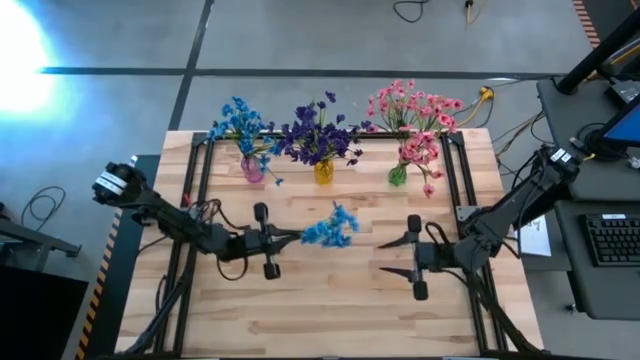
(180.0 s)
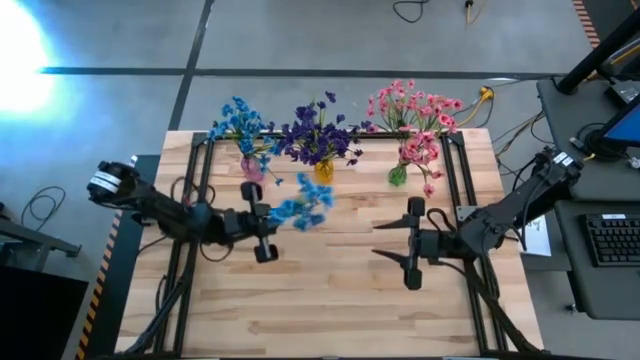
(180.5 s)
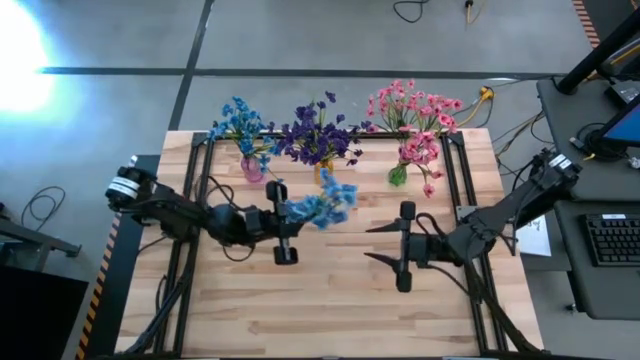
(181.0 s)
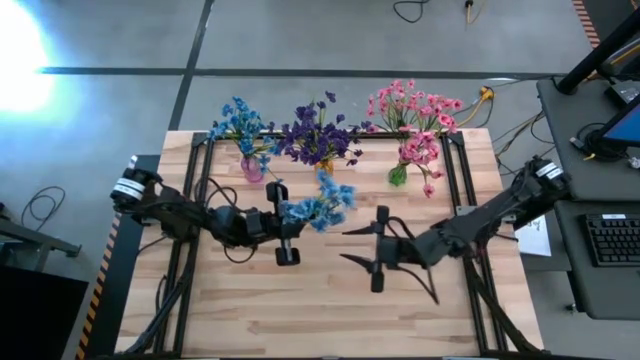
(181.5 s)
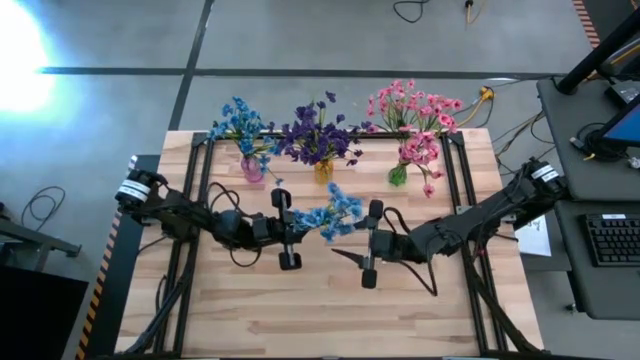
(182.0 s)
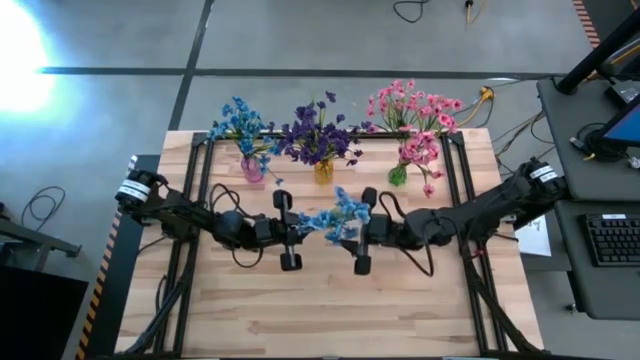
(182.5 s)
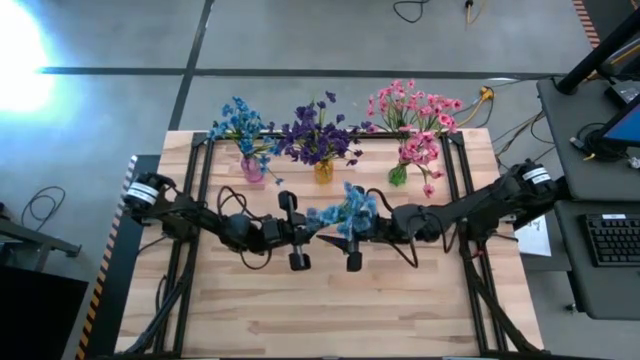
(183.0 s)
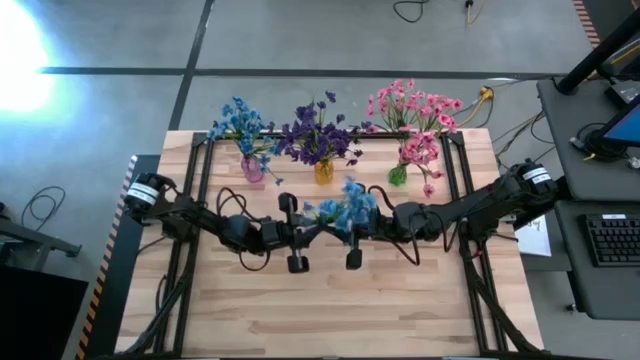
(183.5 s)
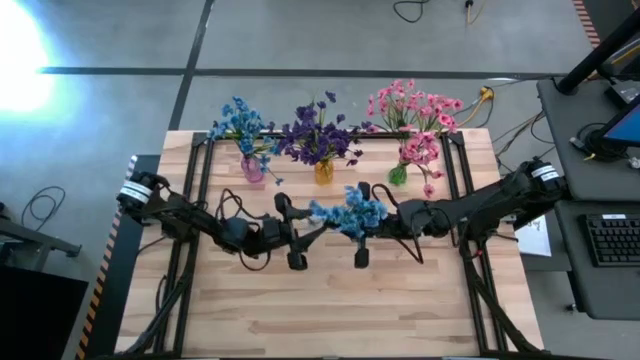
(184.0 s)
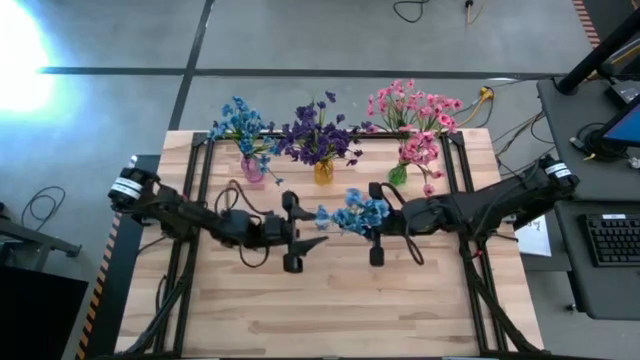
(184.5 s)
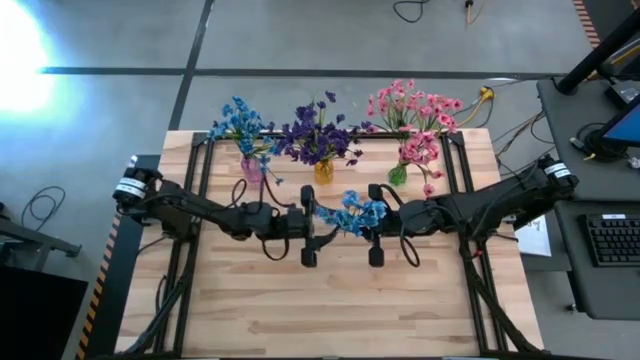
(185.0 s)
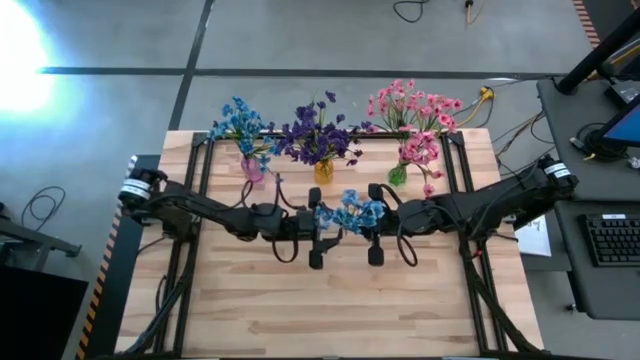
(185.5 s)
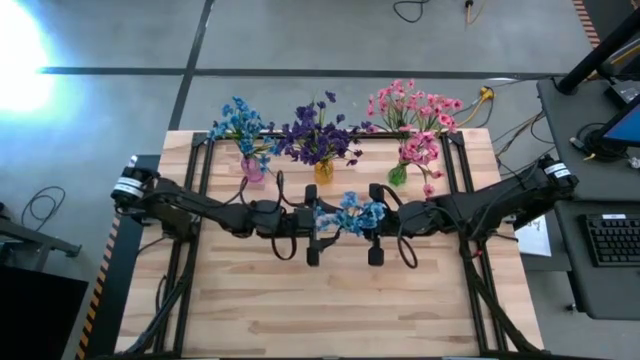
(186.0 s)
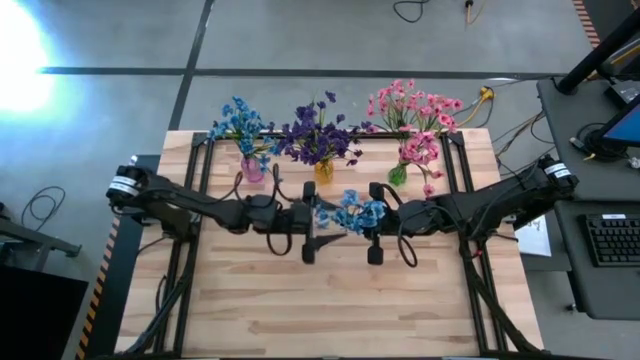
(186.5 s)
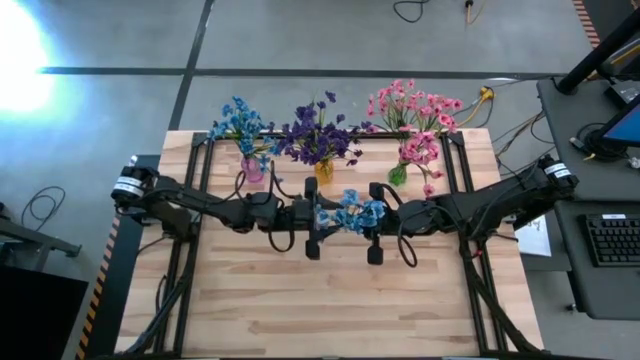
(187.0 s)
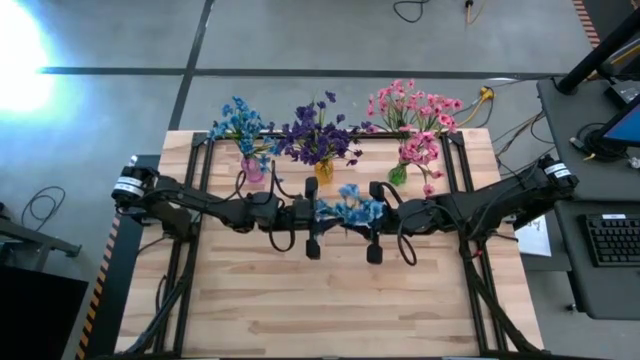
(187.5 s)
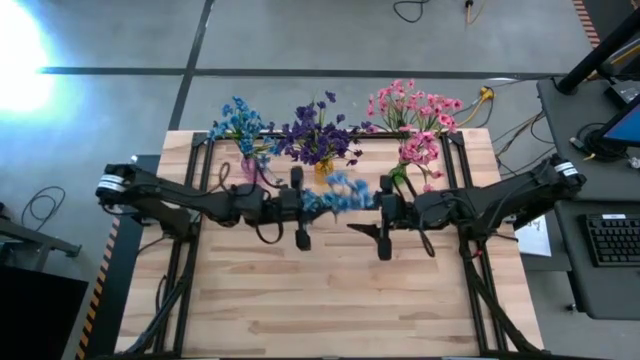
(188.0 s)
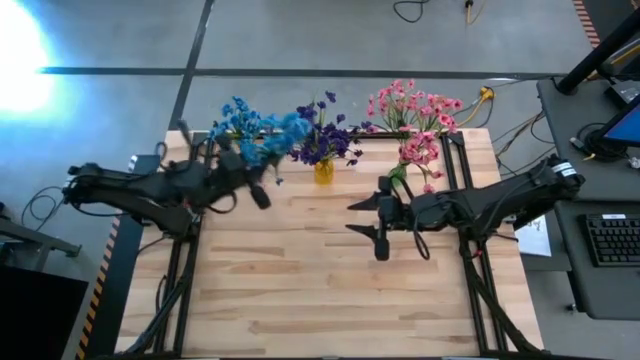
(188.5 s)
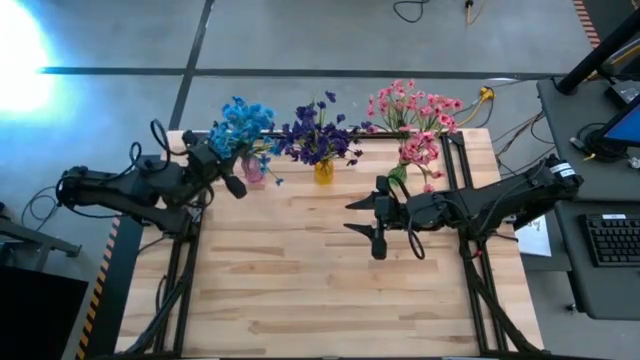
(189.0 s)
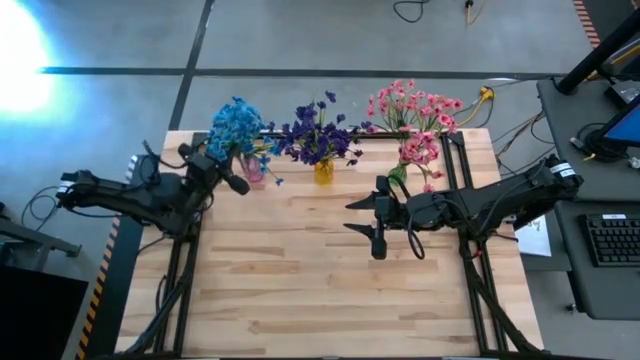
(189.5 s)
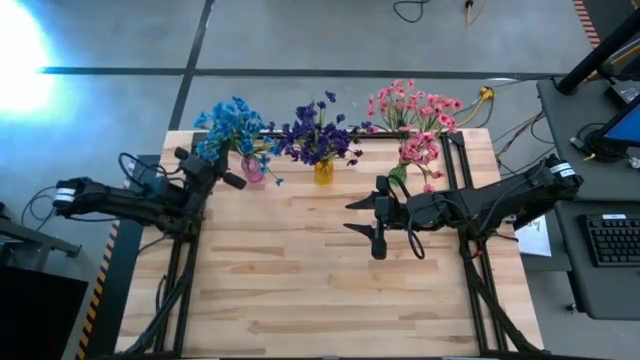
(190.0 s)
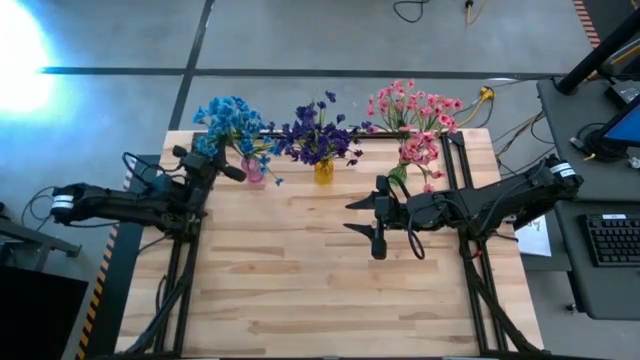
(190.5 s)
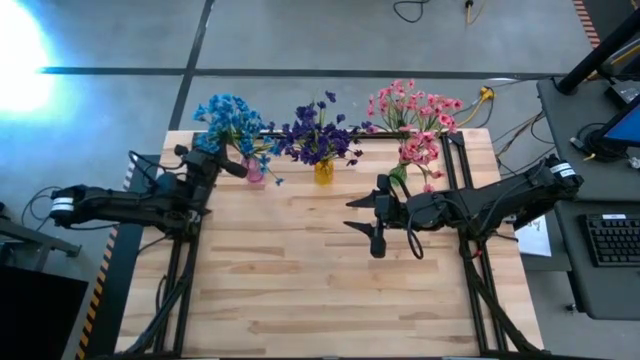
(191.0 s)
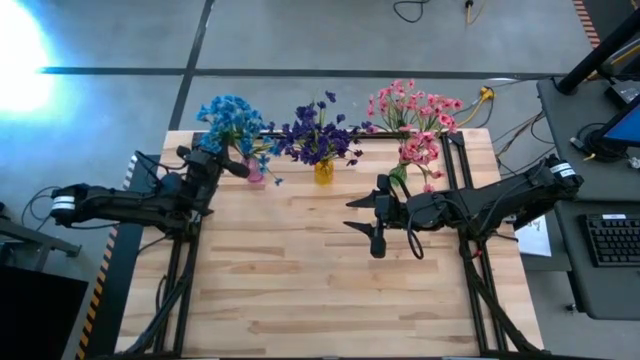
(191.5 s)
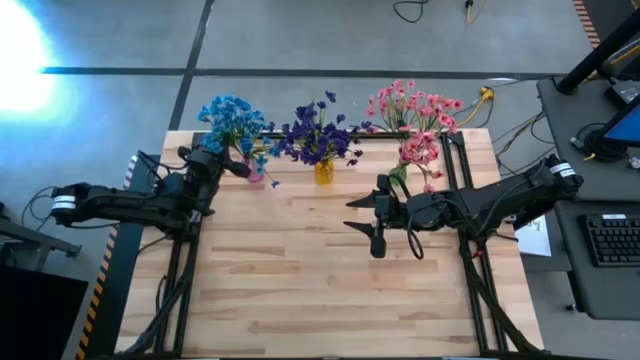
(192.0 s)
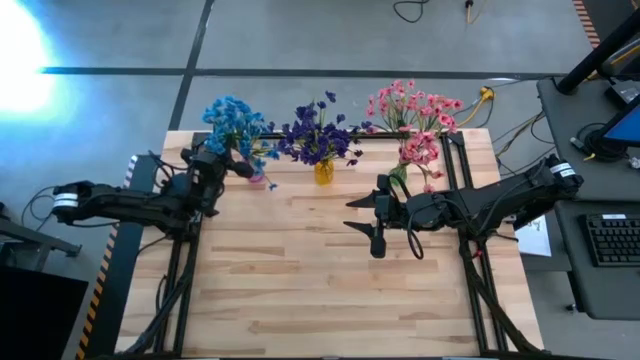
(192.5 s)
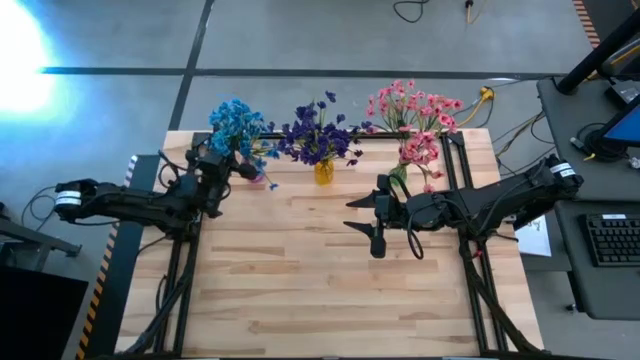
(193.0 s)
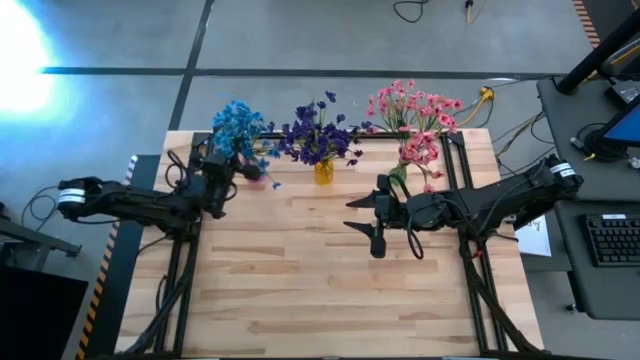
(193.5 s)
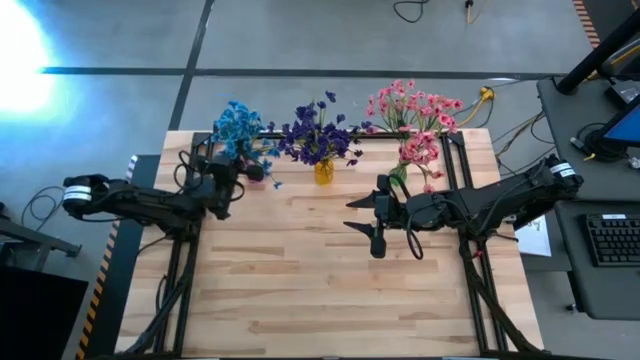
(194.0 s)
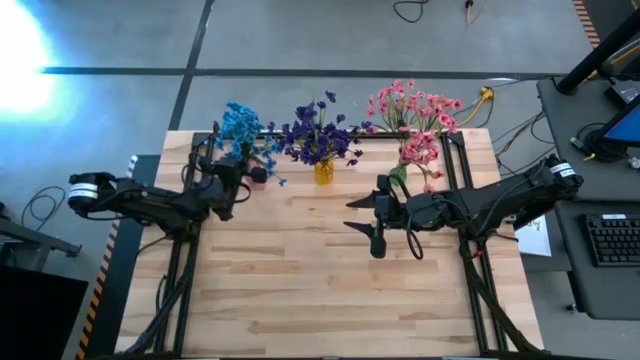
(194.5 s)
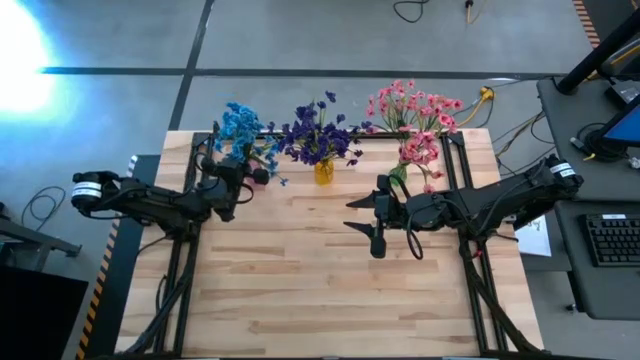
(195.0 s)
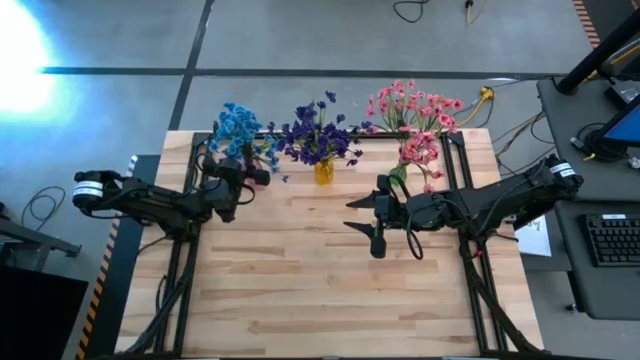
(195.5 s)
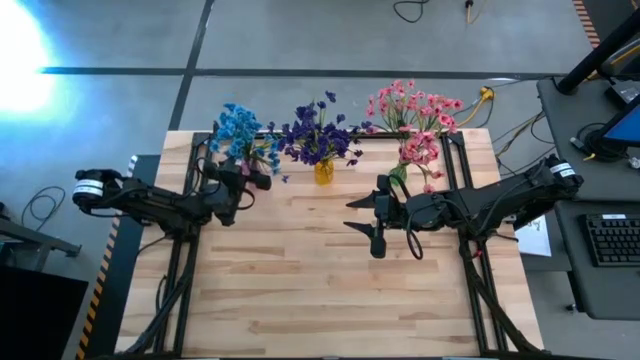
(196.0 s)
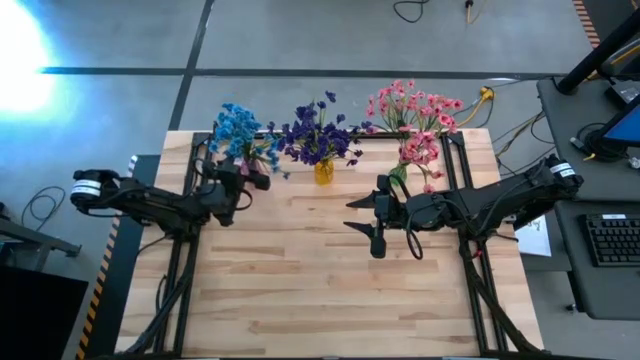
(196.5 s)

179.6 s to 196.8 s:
Task: Sort flowers into vase by color
Put the blue flowers into the violet vase

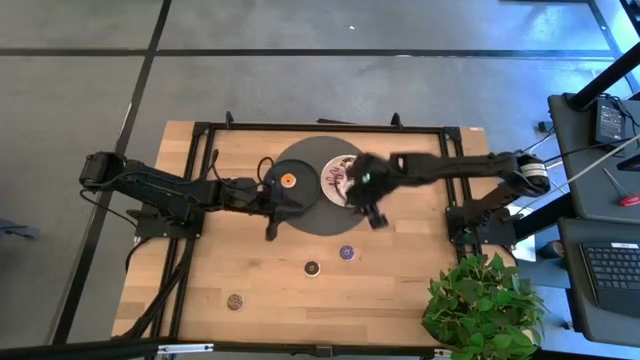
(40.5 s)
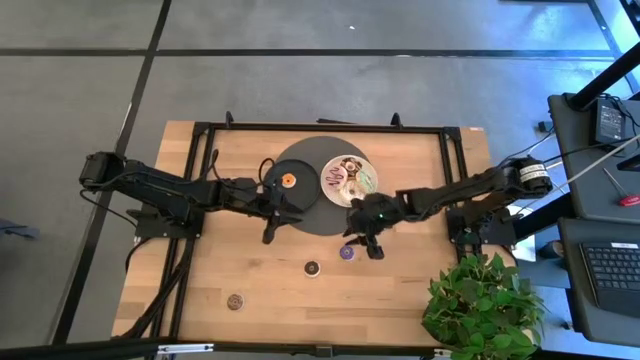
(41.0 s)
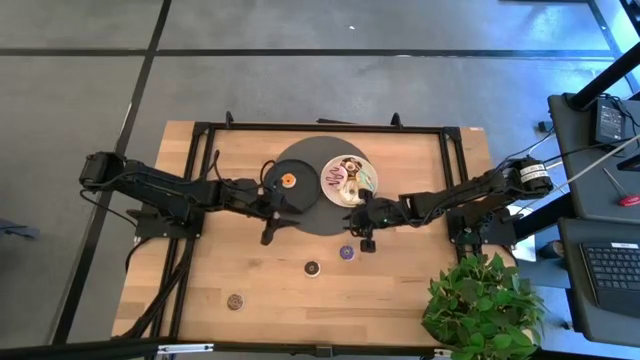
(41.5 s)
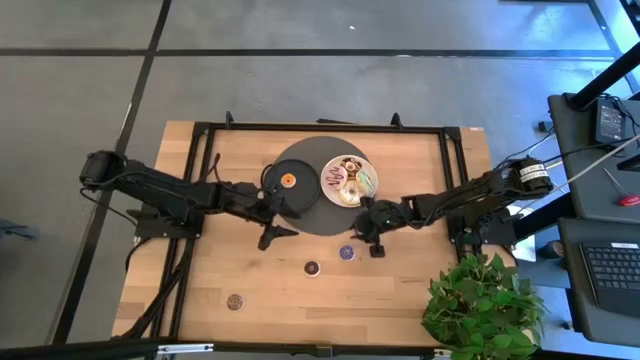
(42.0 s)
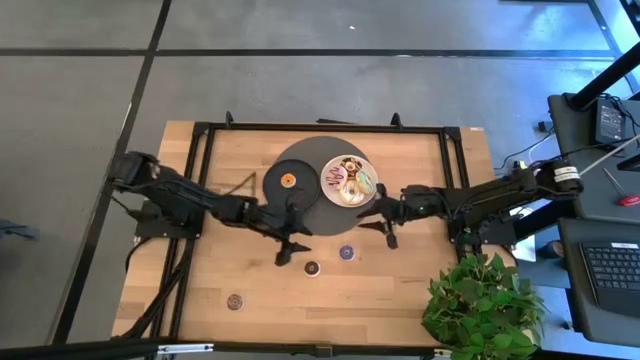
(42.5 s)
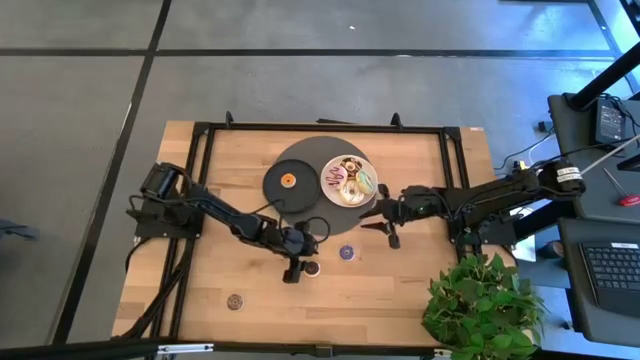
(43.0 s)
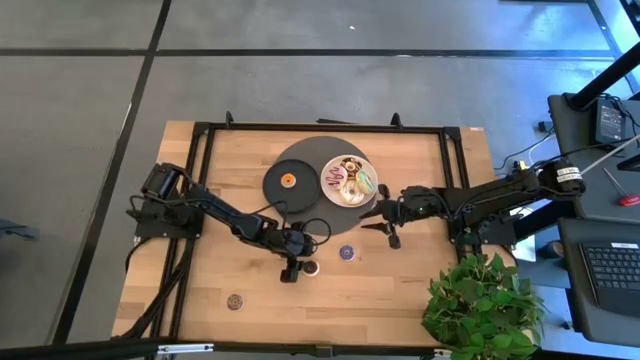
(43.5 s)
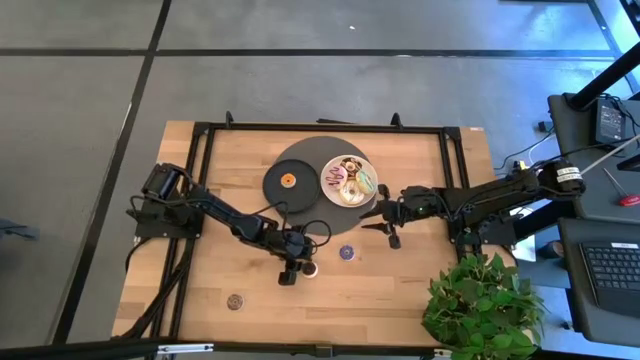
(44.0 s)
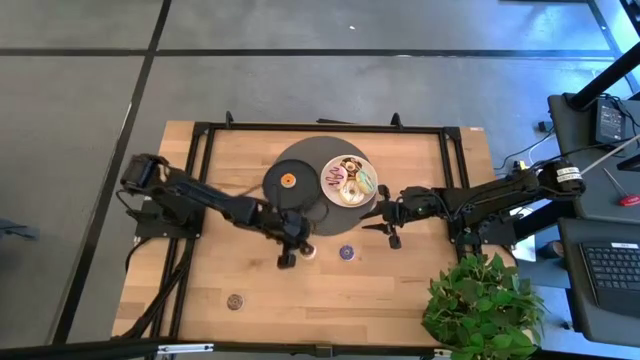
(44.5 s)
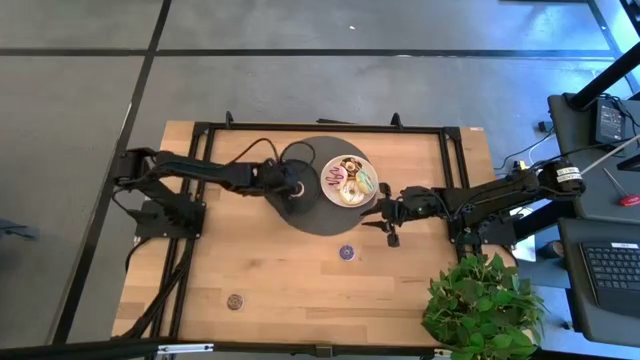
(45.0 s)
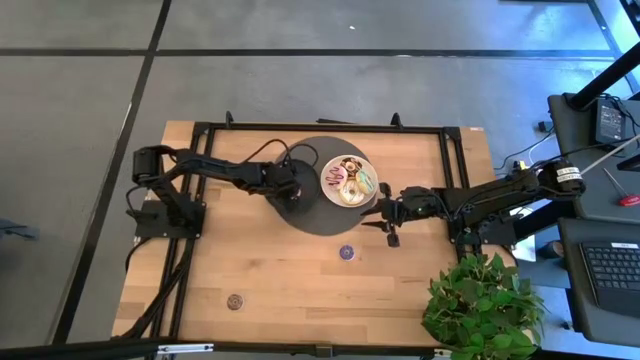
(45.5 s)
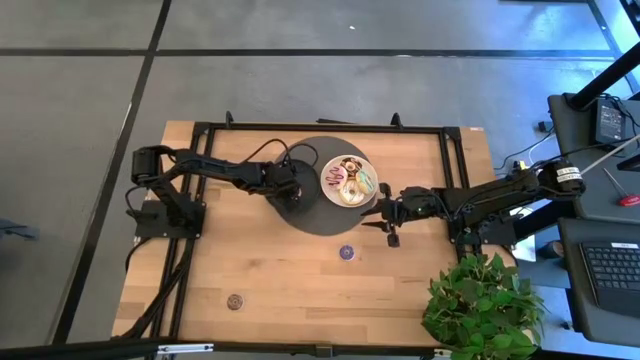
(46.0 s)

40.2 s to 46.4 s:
Task: Pick & Place donuts
Put the right small brown donut on the black plate
